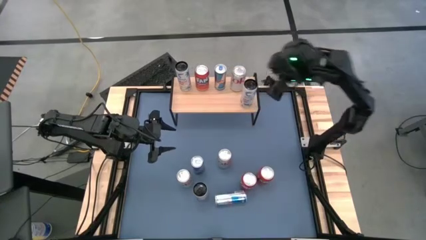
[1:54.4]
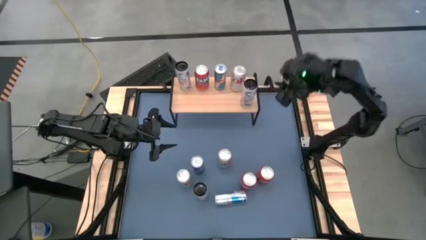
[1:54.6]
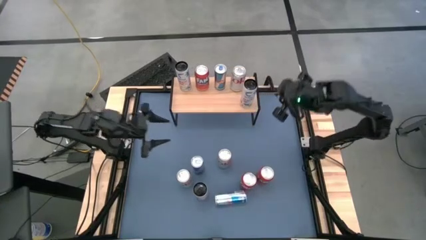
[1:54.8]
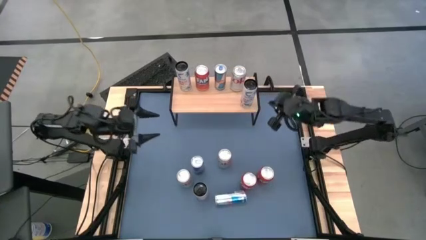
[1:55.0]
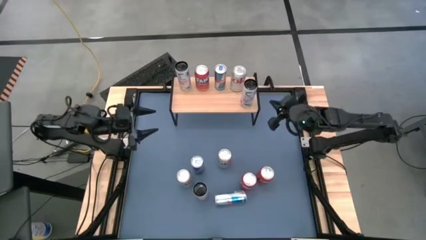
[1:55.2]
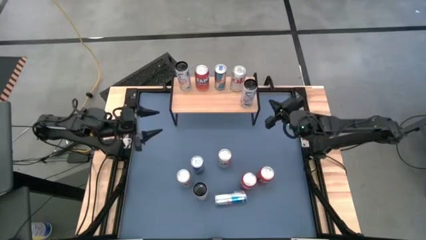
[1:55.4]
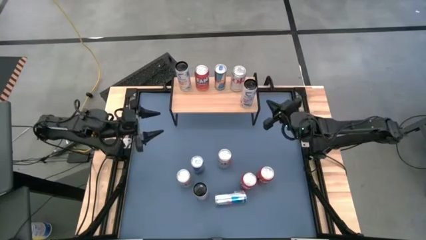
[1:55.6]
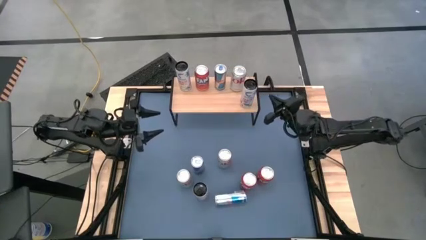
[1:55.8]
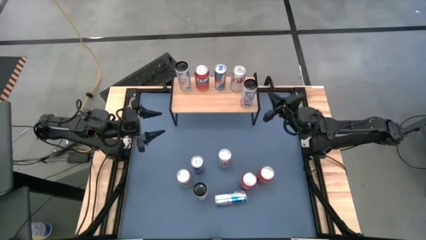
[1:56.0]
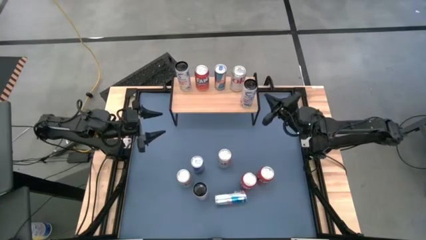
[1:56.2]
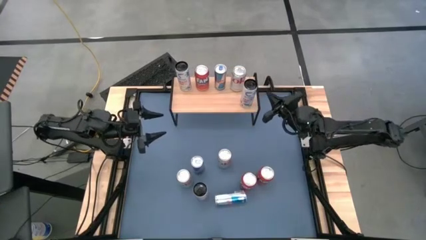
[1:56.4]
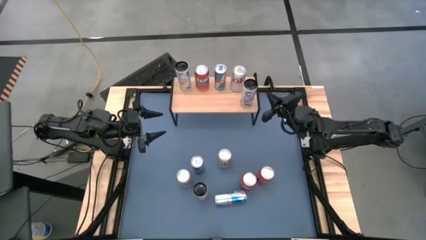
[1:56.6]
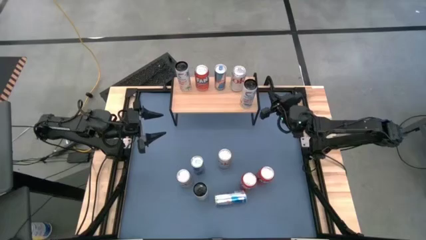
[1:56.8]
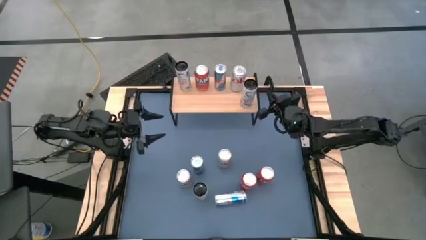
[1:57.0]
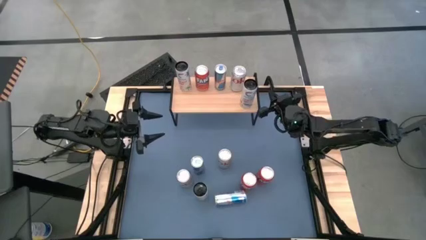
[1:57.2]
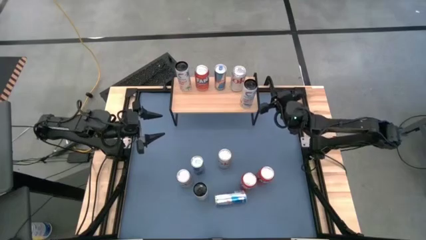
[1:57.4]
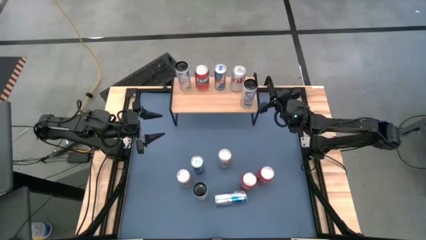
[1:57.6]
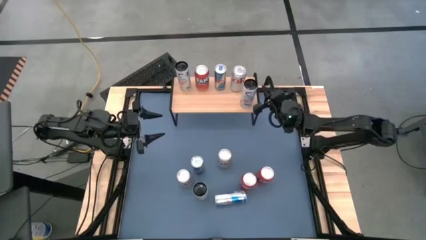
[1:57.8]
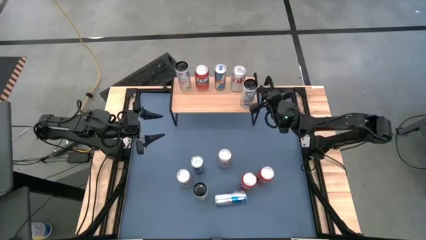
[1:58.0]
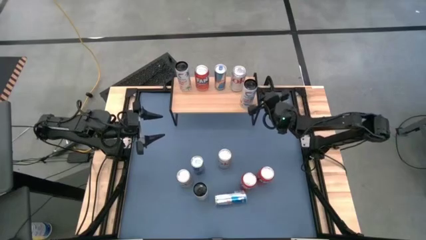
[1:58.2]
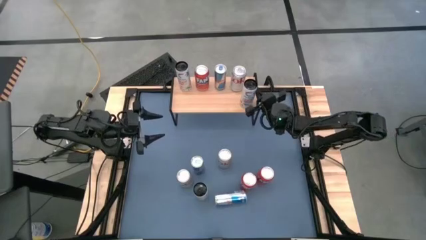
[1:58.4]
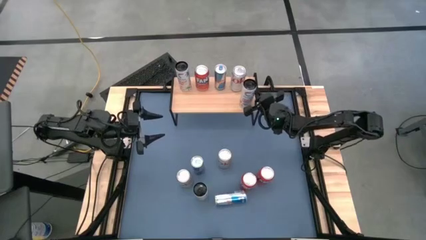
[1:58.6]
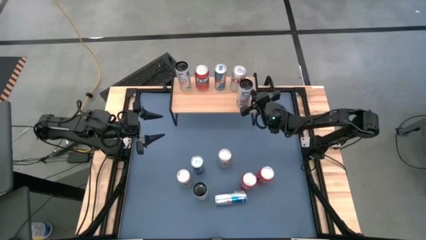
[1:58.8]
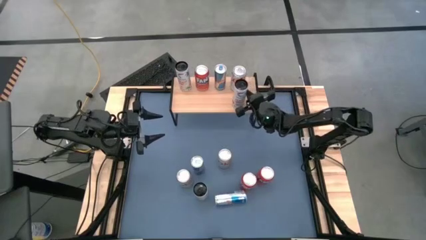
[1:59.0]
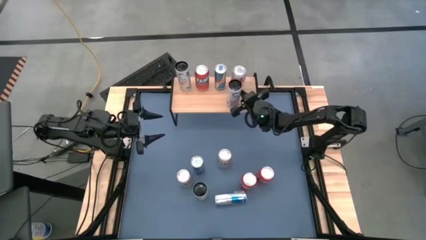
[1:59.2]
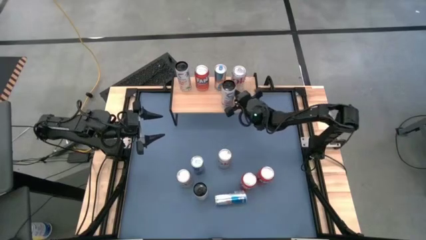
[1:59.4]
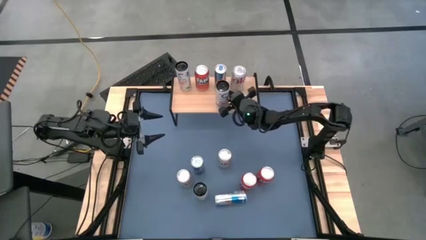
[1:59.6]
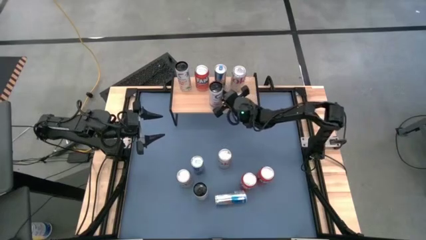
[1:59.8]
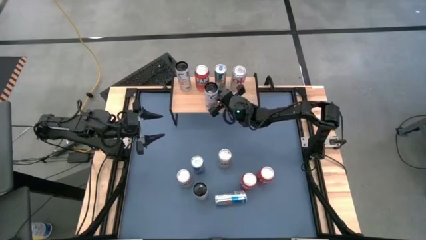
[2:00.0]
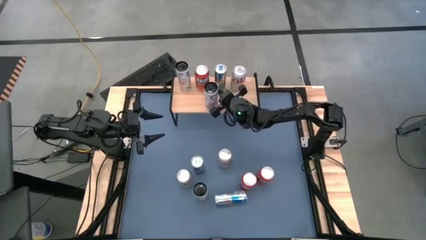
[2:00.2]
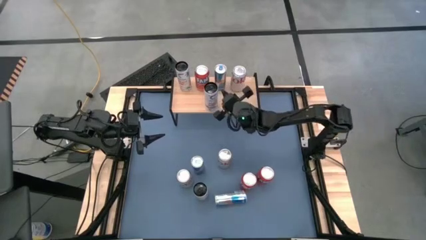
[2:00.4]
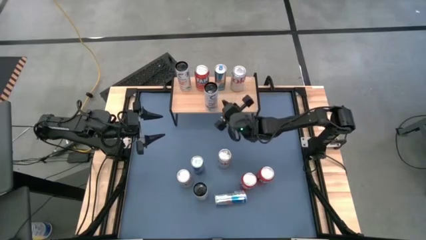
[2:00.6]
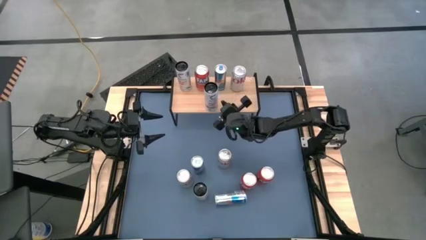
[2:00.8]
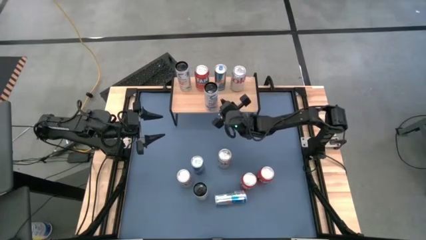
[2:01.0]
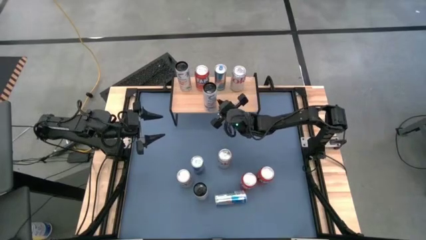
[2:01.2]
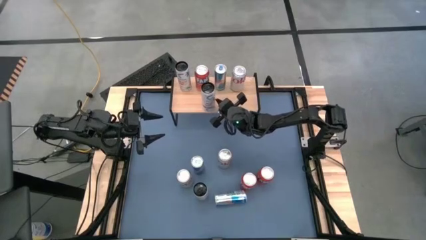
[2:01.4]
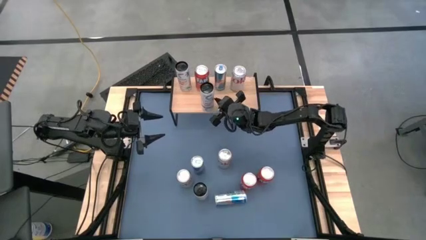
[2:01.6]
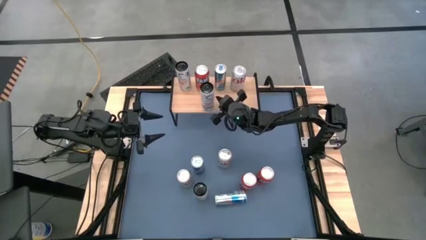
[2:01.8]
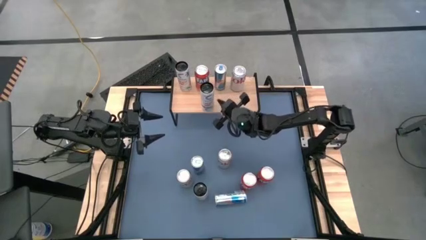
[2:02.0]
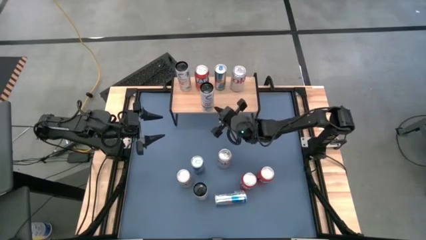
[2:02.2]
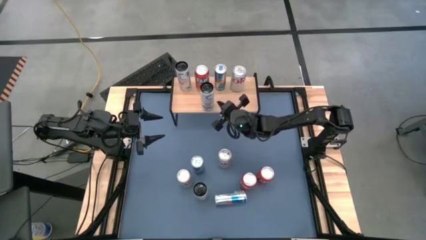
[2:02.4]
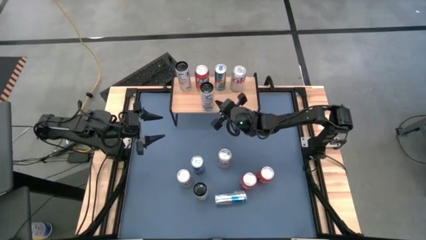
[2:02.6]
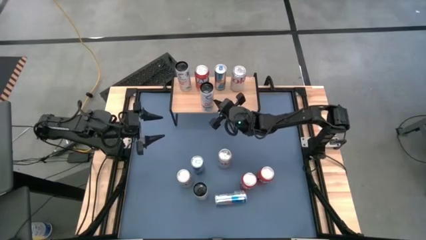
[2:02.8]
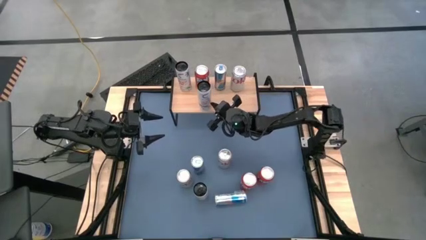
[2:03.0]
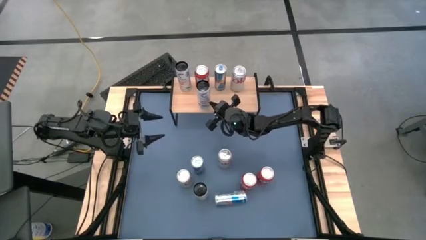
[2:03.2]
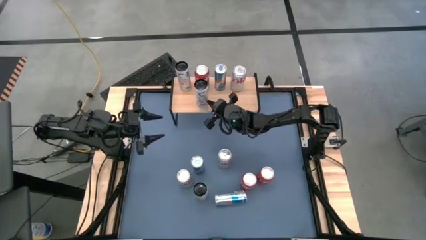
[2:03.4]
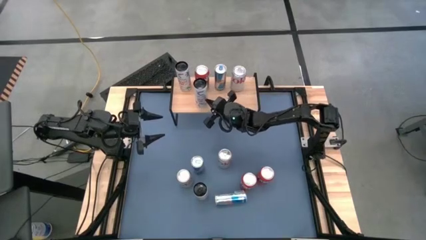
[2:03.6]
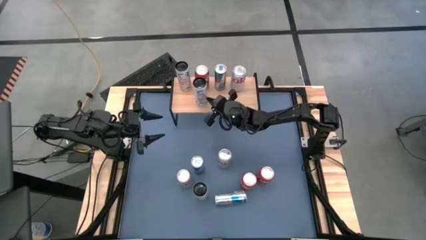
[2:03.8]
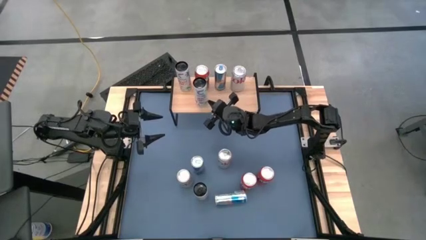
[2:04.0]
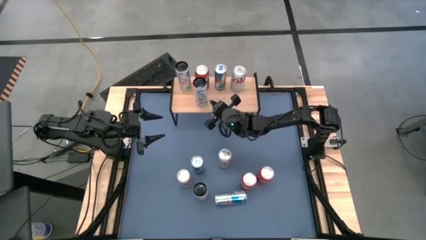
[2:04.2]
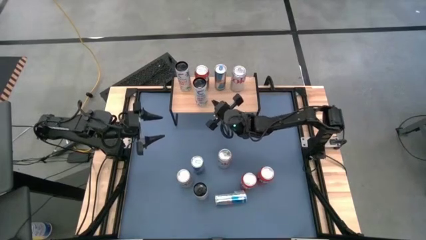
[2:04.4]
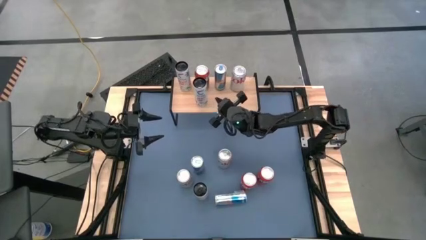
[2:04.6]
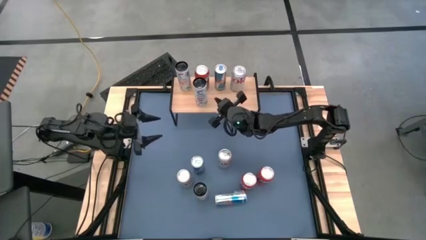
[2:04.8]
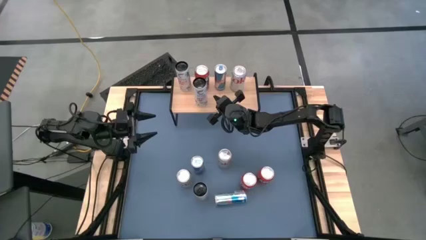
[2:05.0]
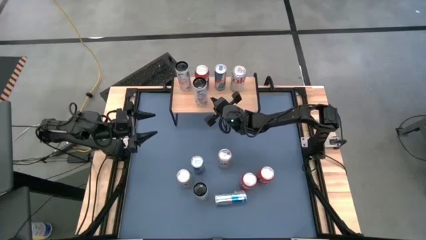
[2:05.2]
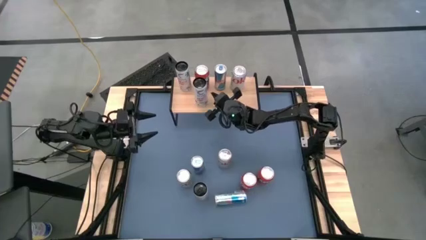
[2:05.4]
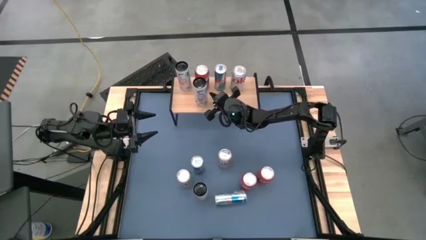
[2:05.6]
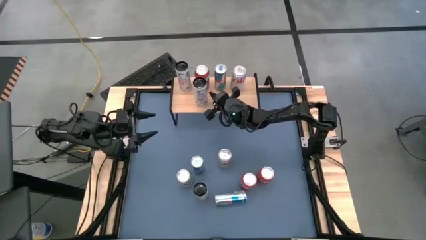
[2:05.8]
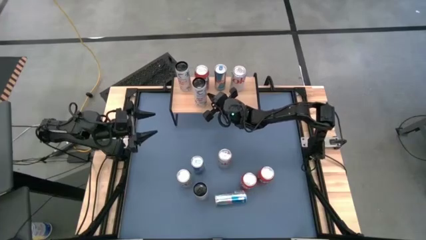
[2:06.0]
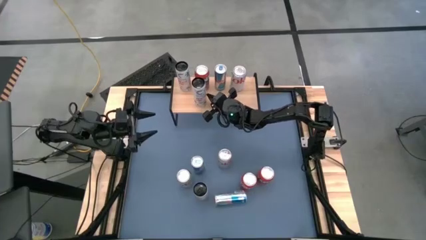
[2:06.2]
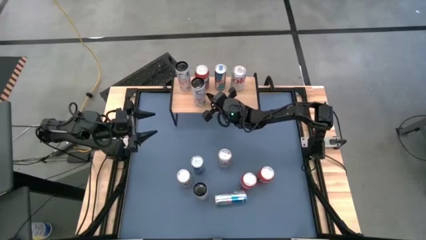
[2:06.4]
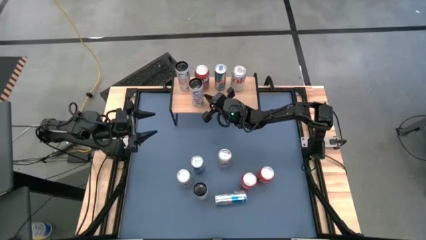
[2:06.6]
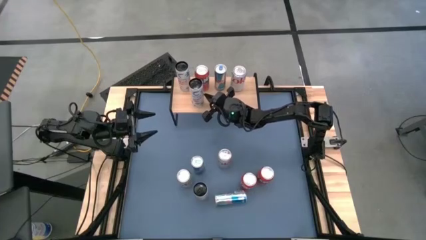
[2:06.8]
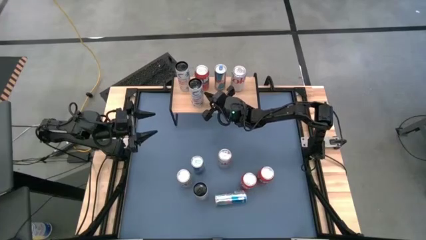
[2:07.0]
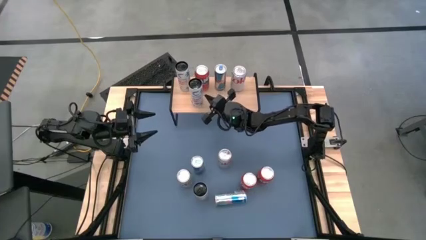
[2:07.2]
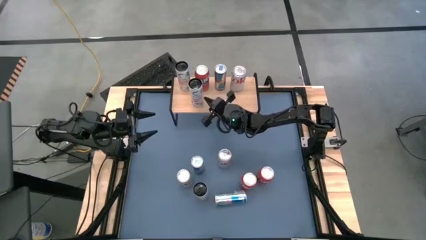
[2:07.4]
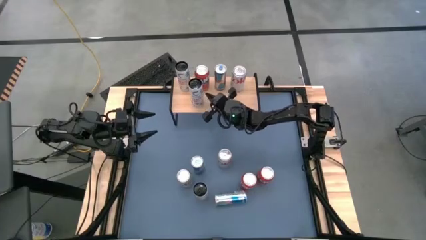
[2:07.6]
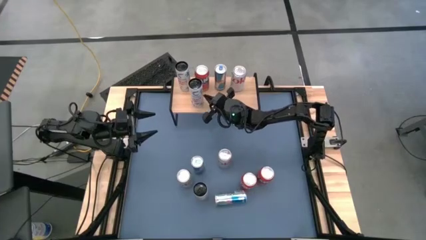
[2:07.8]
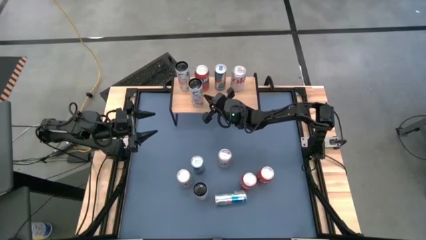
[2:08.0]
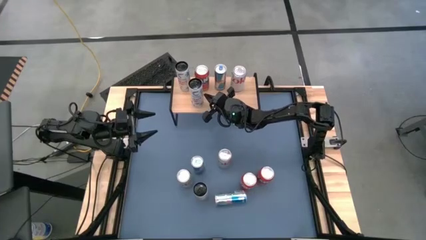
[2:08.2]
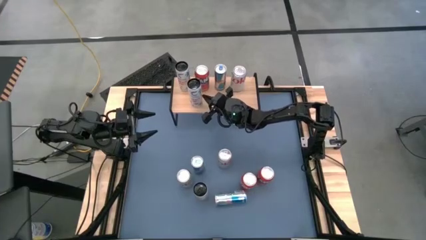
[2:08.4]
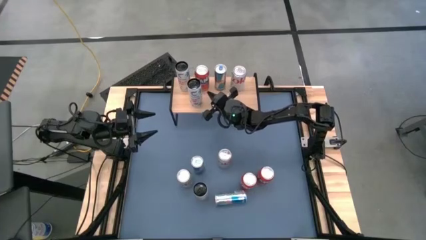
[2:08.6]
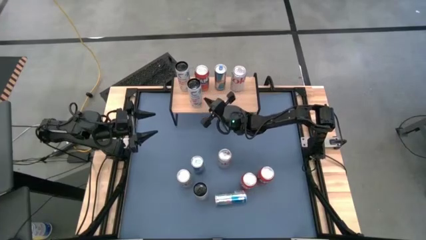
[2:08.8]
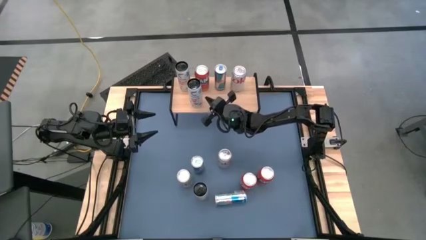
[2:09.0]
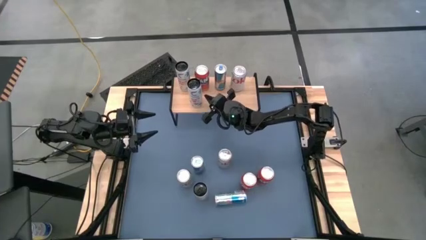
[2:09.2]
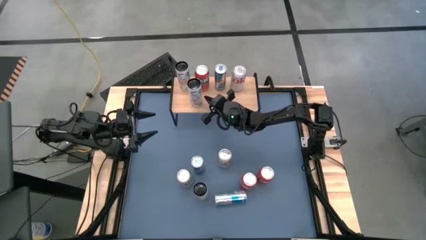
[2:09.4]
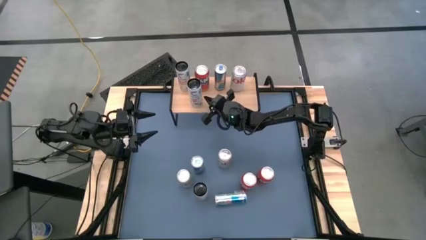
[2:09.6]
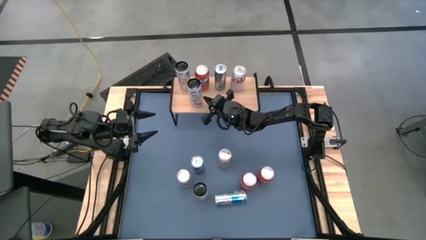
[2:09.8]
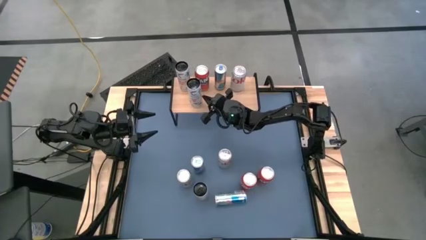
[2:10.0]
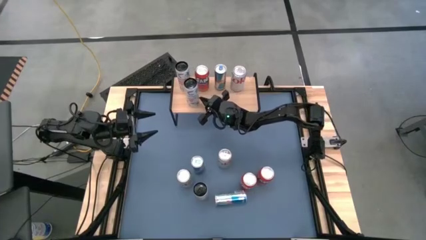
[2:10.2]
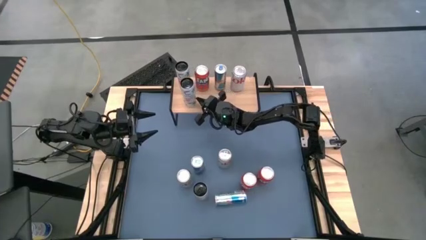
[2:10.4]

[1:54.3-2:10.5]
Task: Place canned beverage on shelf
Adjust the black soda can
